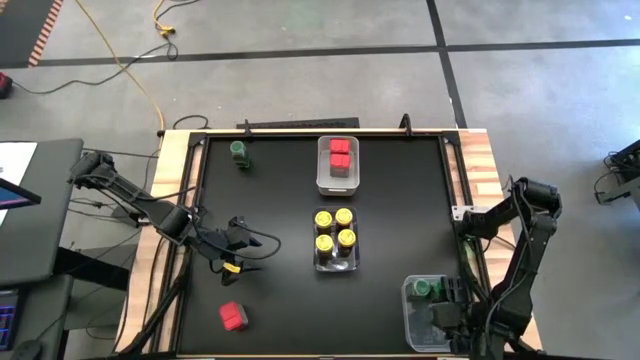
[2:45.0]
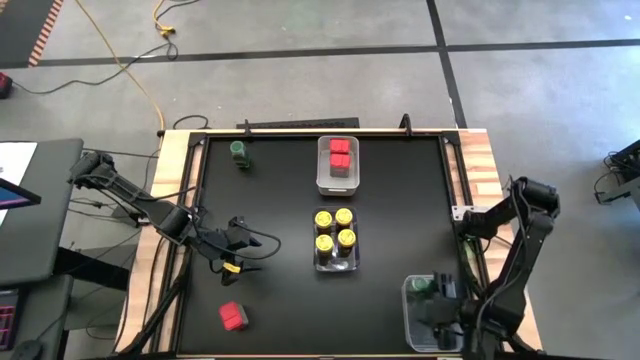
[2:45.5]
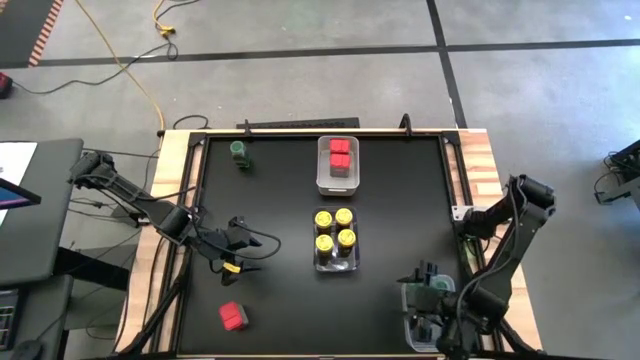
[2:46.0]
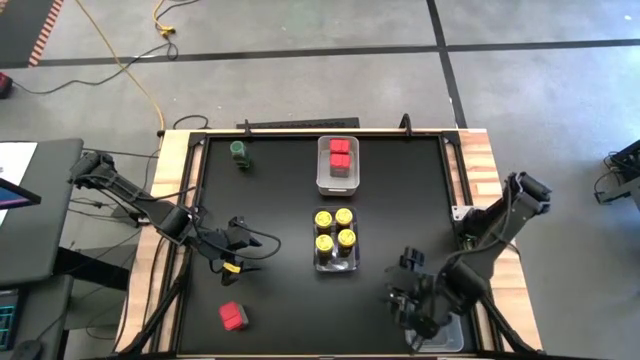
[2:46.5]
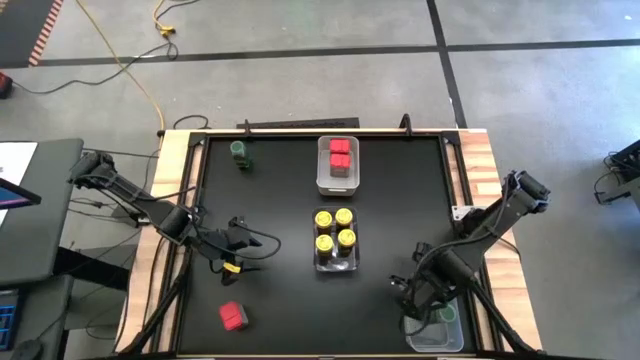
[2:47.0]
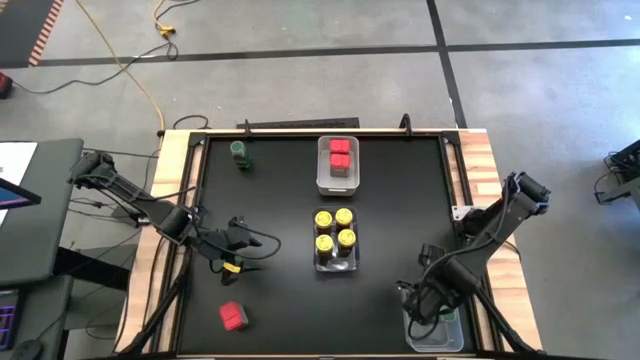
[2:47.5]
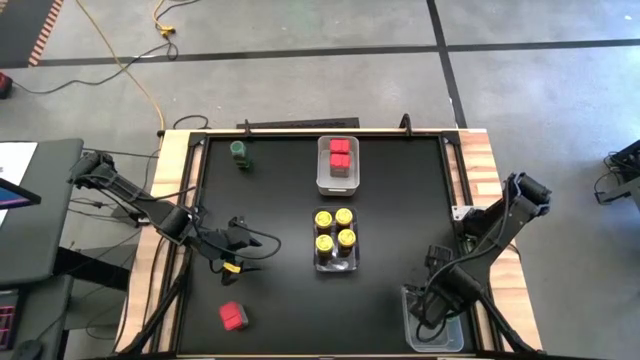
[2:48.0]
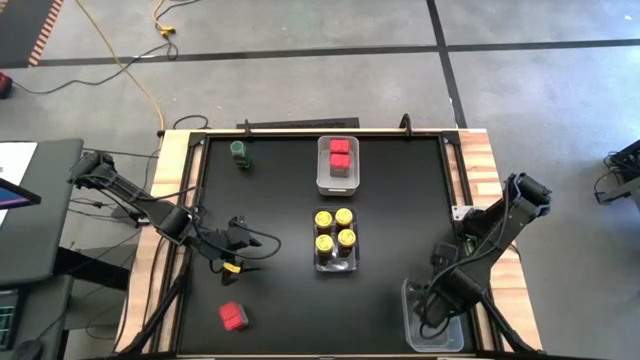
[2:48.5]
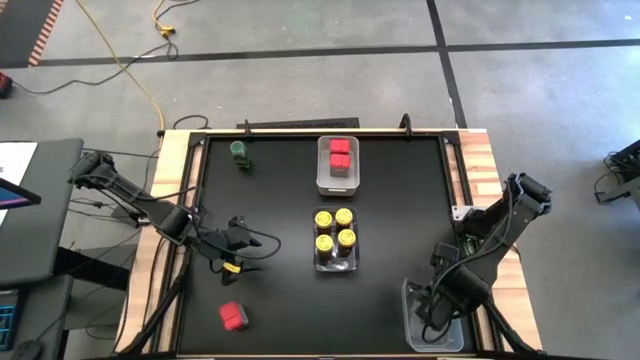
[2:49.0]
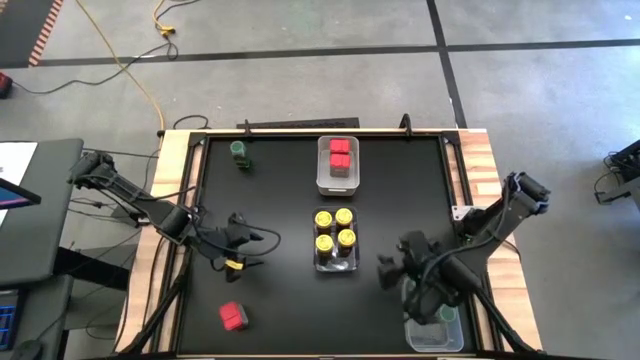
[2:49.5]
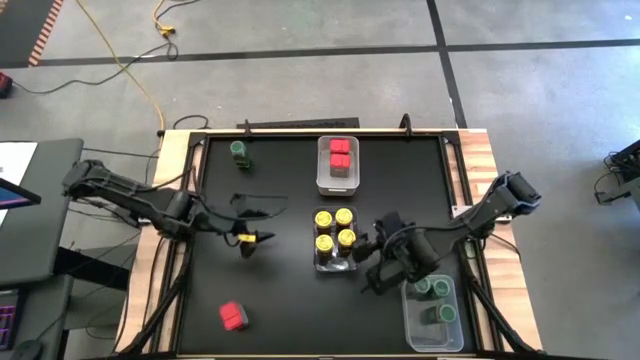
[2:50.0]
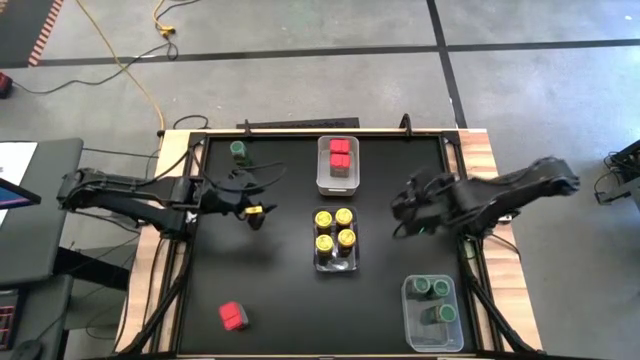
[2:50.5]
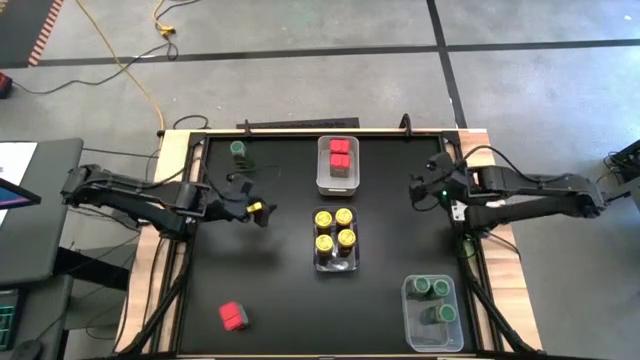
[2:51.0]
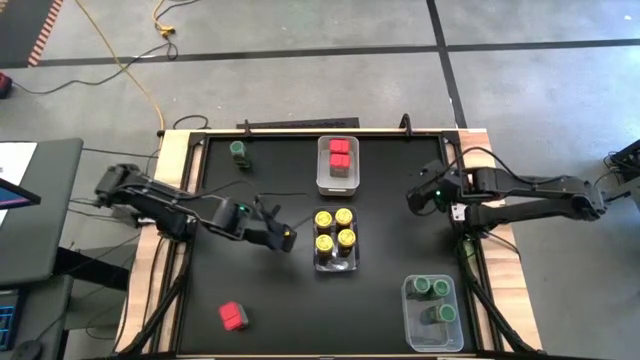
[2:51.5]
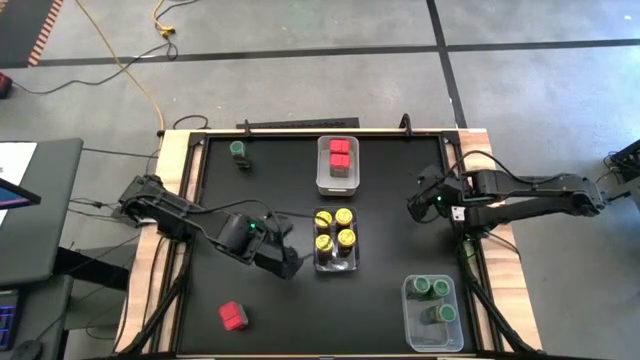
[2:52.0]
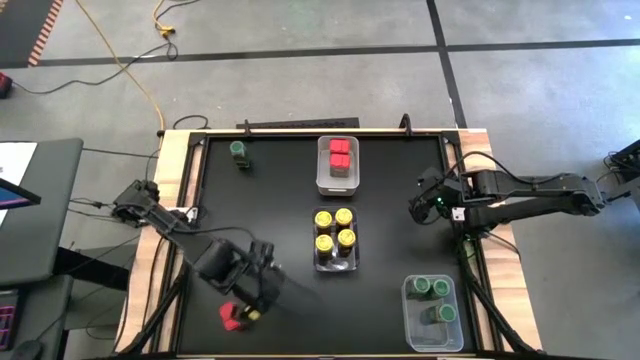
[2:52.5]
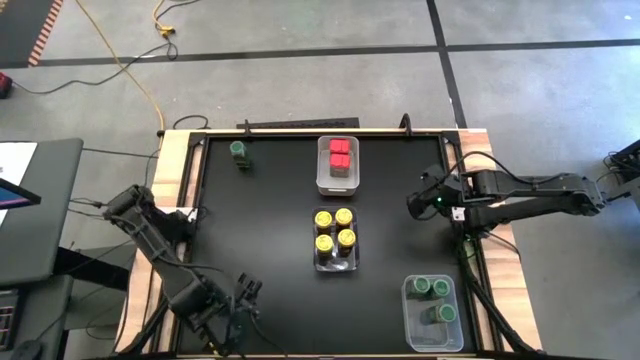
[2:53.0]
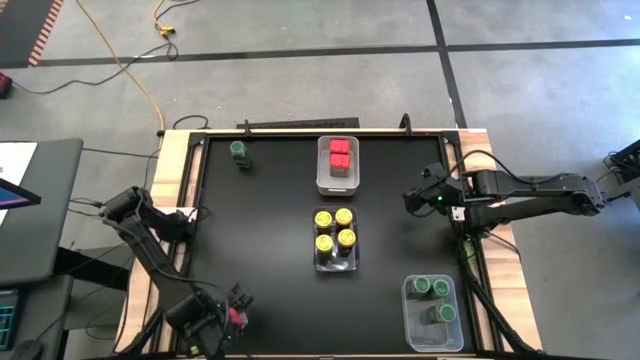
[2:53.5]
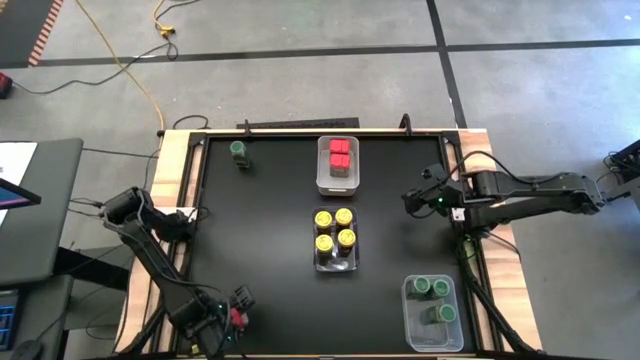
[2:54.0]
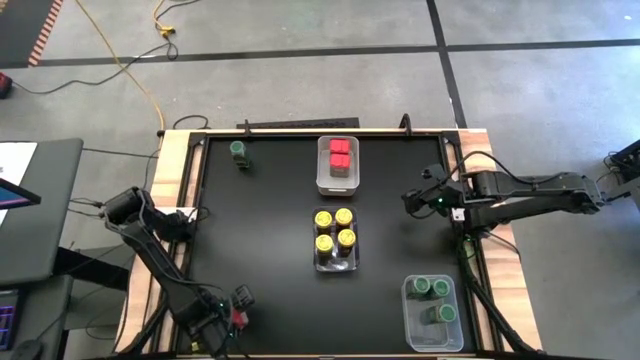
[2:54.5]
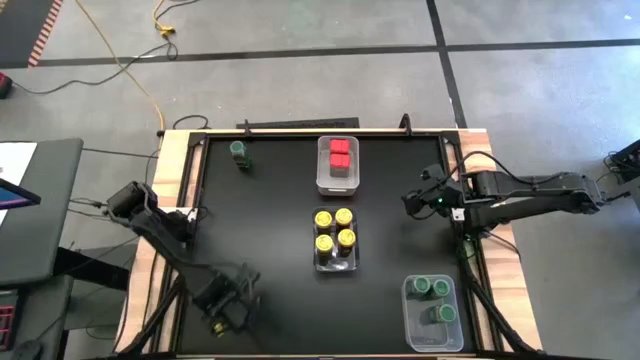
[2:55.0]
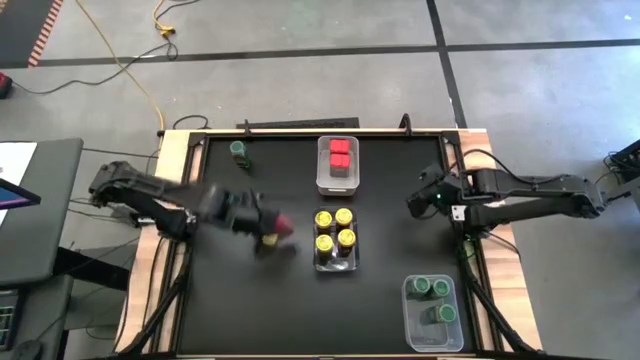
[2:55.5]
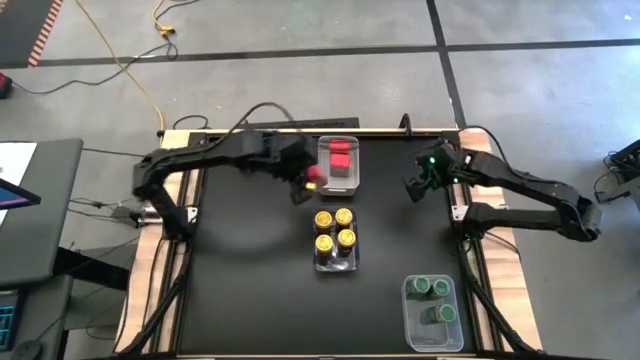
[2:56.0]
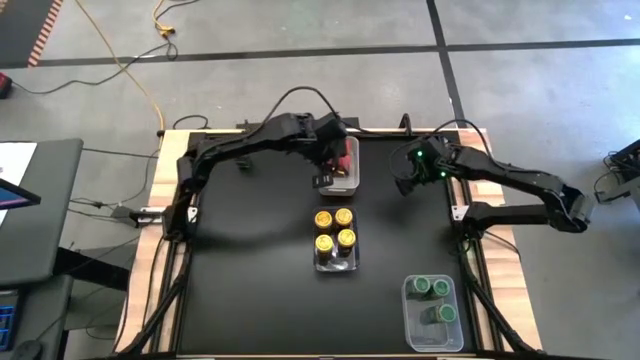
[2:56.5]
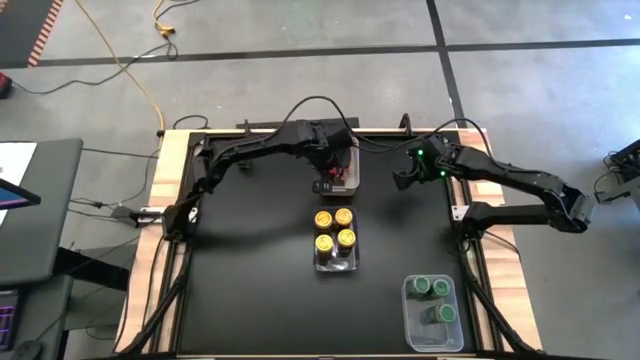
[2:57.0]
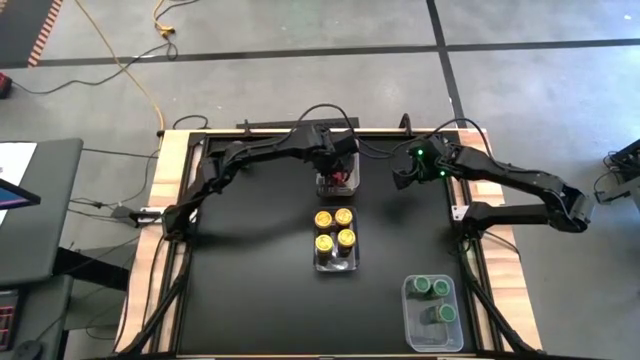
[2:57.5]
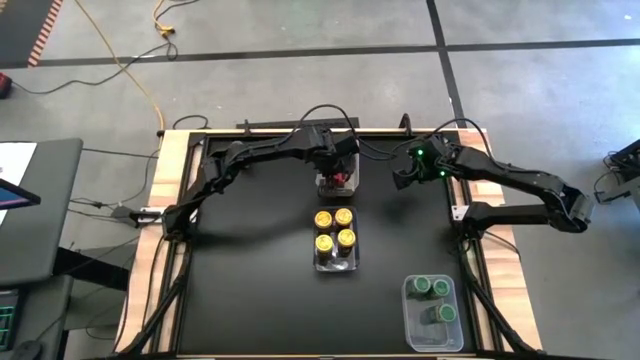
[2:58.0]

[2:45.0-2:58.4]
Task: Sort spices by type
Put the red seasoning can into the white bin
